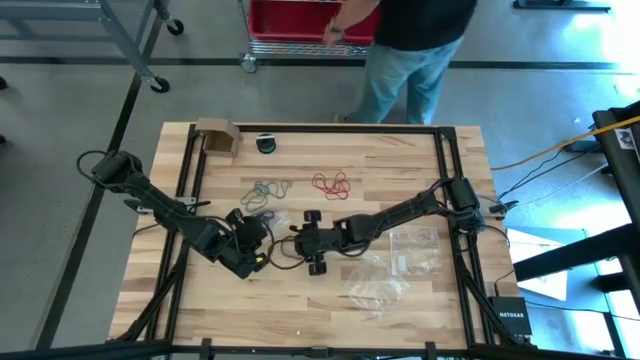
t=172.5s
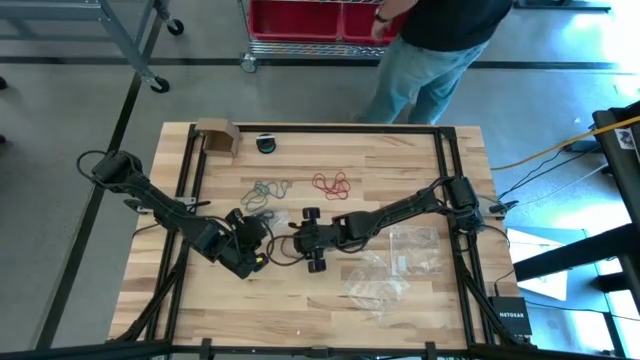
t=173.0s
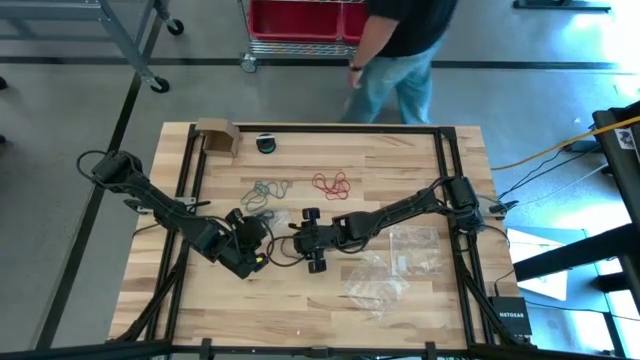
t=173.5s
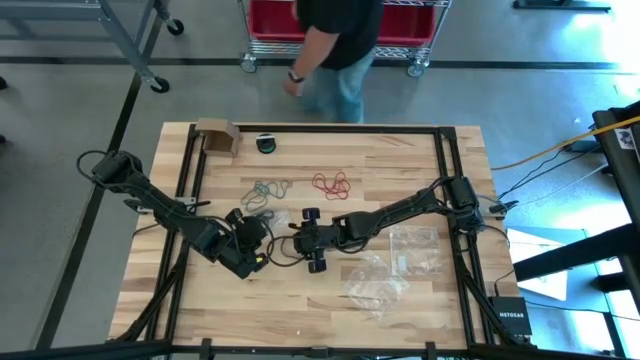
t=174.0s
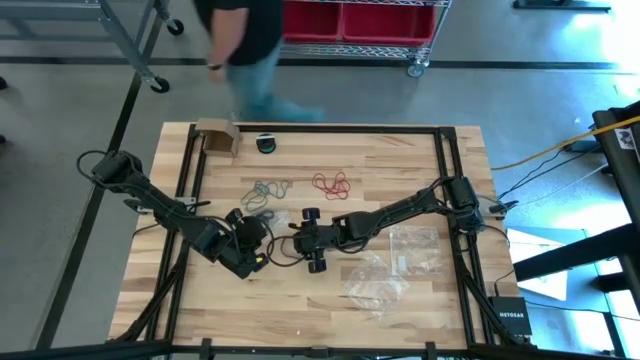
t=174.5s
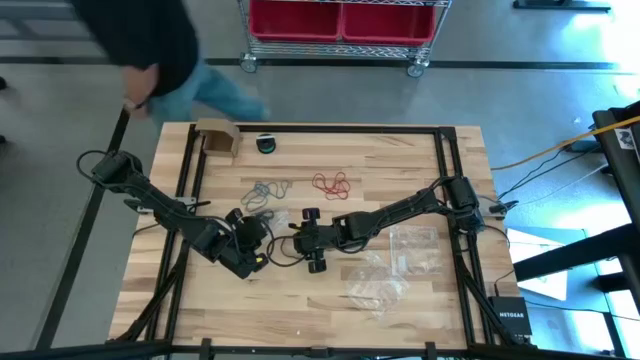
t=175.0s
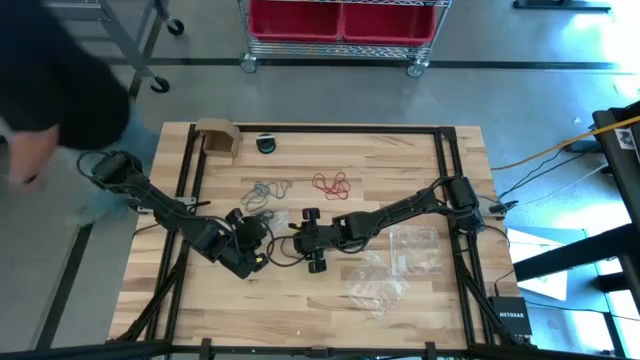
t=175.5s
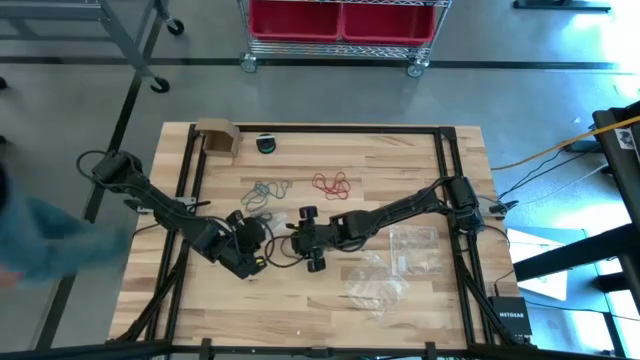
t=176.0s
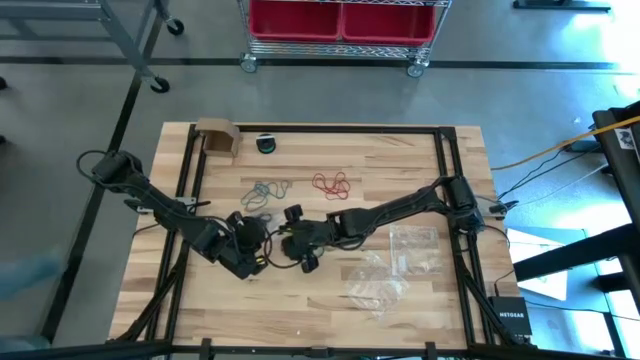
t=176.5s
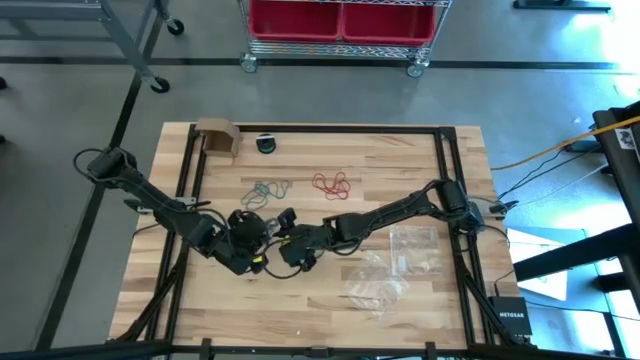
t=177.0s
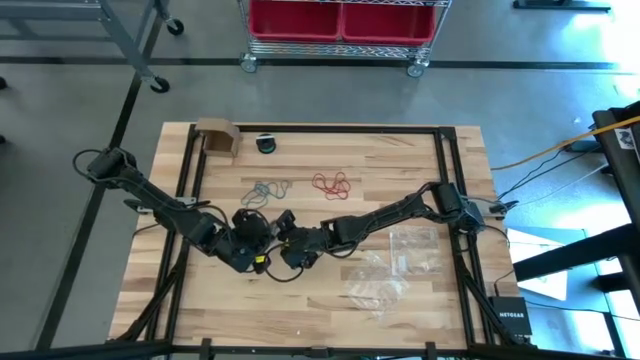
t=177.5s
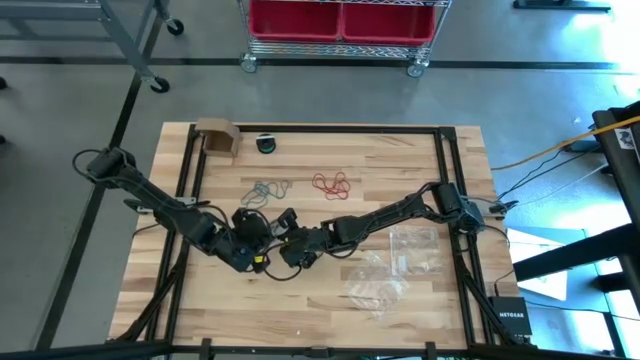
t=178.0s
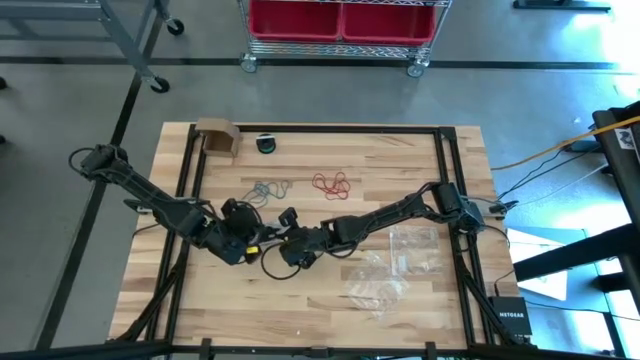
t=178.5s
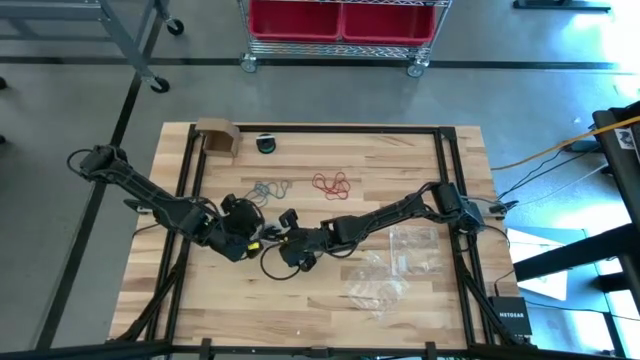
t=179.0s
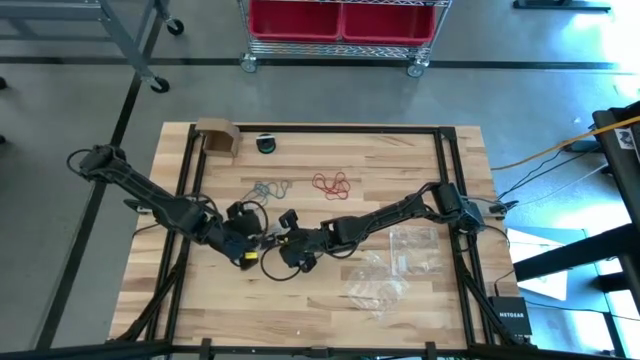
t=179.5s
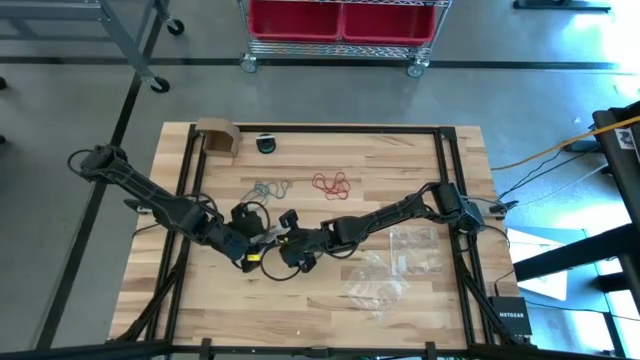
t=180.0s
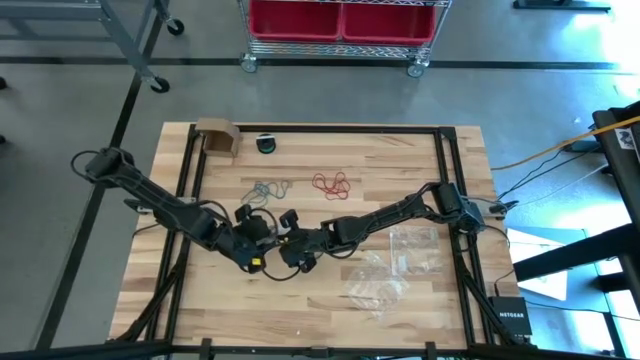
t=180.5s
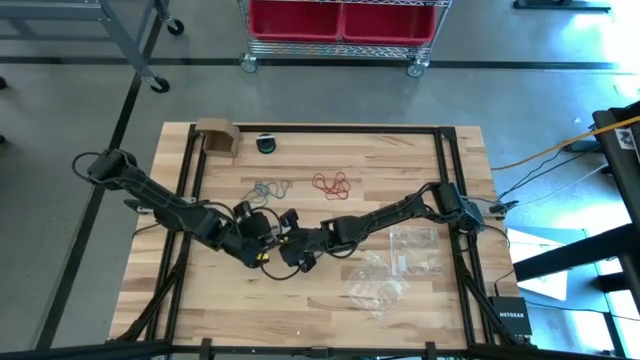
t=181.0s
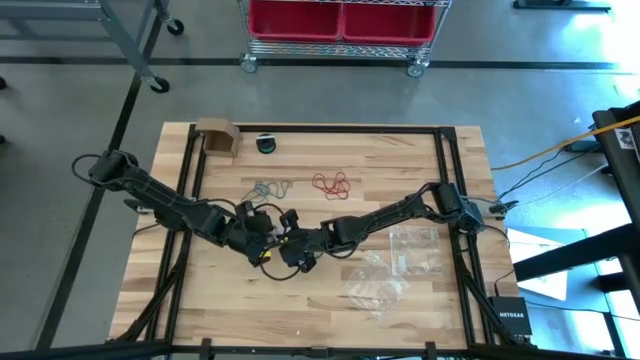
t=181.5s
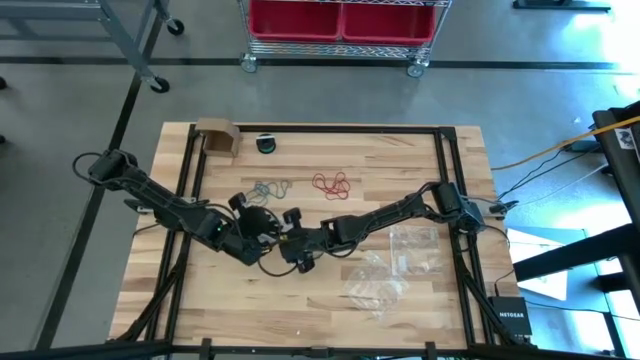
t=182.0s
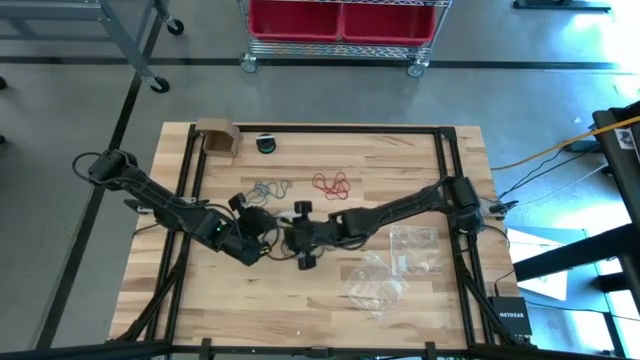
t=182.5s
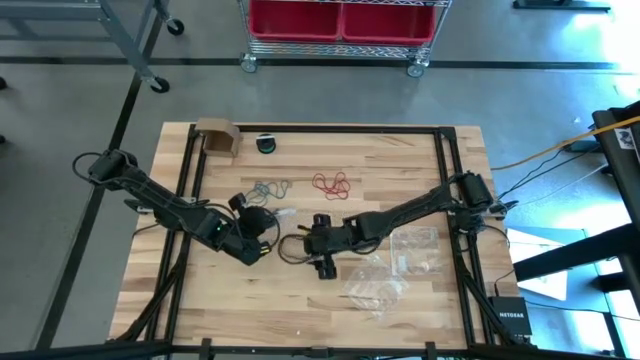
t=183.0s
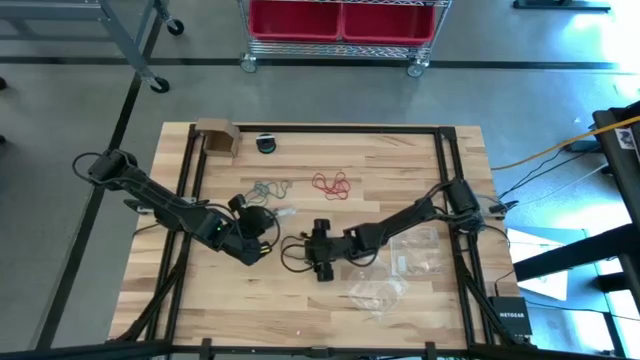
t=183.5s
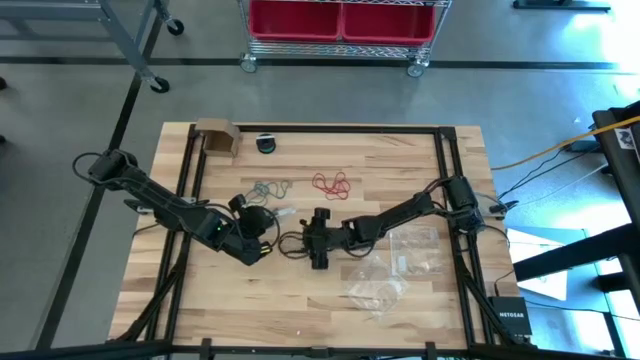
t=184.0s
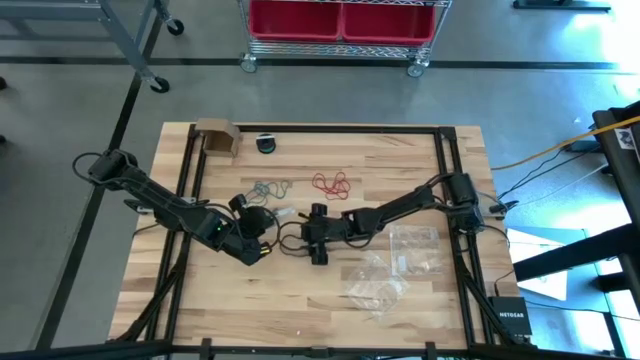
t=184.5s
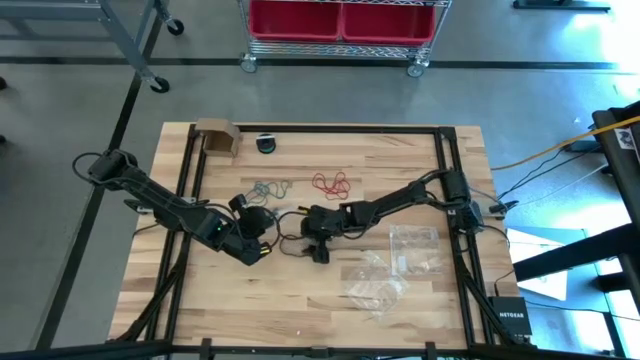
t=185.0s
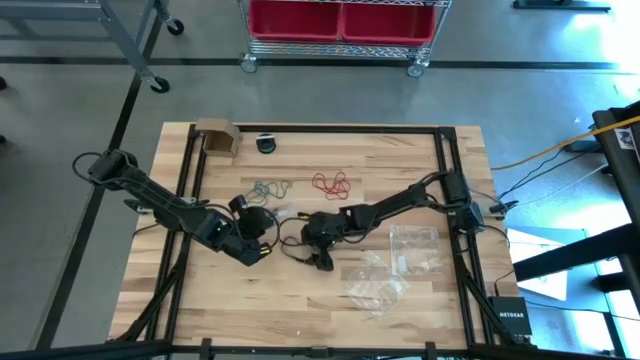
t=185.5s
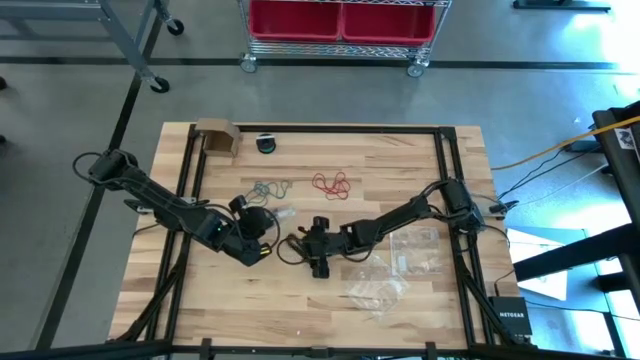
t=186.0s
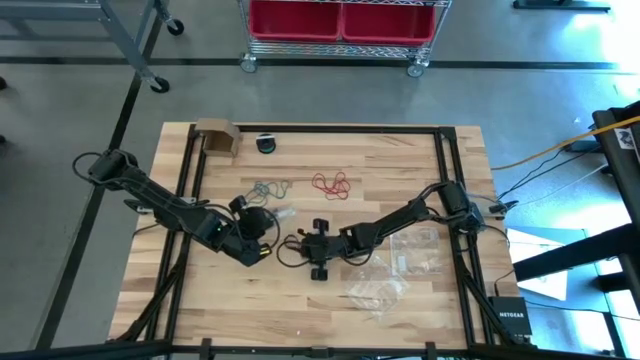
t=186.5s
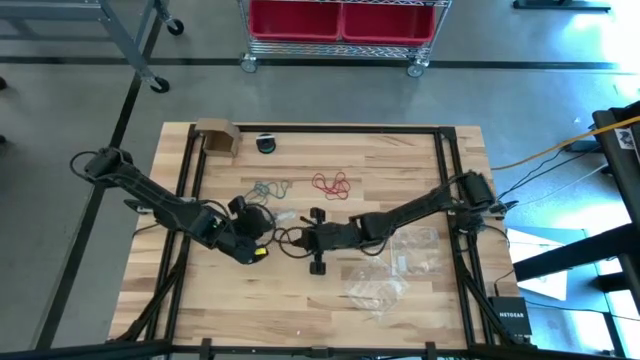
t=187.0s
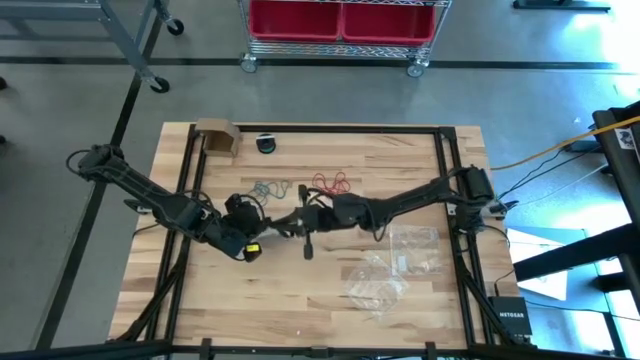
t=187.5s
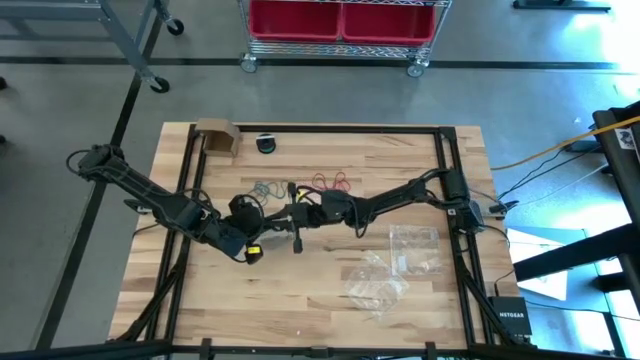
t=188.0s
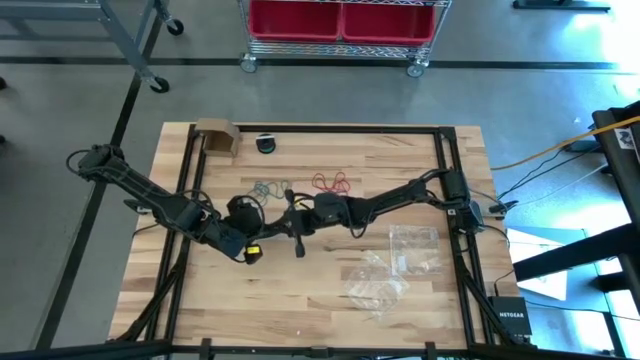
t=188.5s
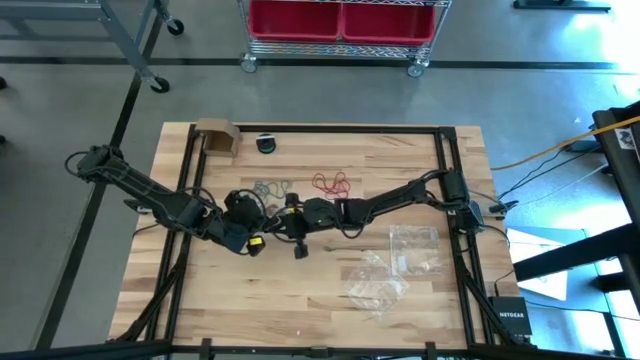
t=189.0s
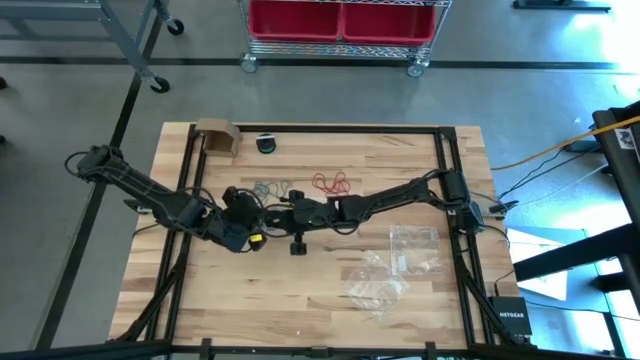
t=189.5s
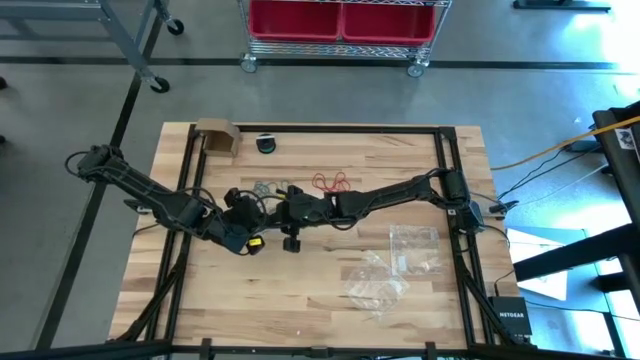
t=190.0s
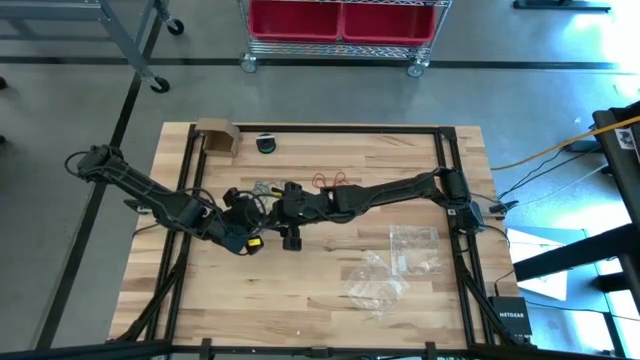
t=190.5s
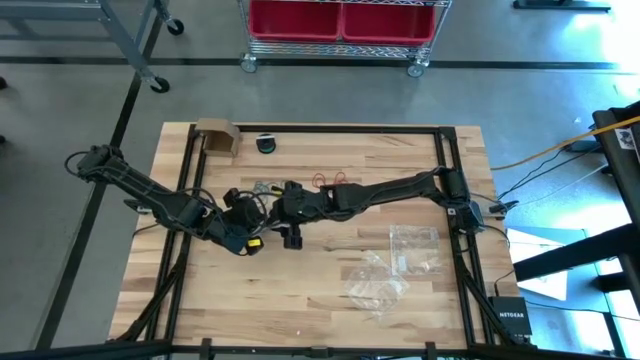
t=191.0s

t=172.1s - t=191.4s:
Task: Sort rubber bands
Put the black rubber band into the transparent zip bag

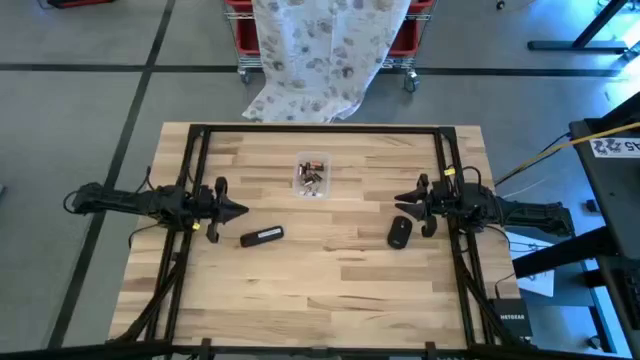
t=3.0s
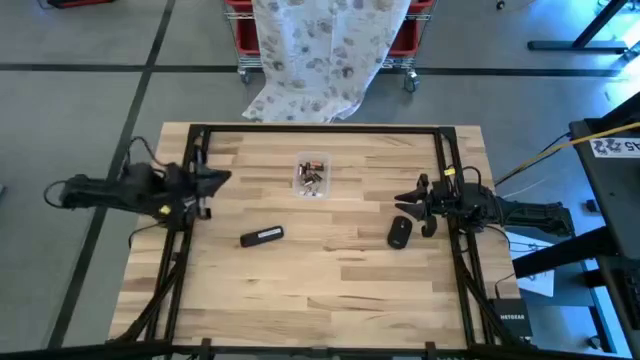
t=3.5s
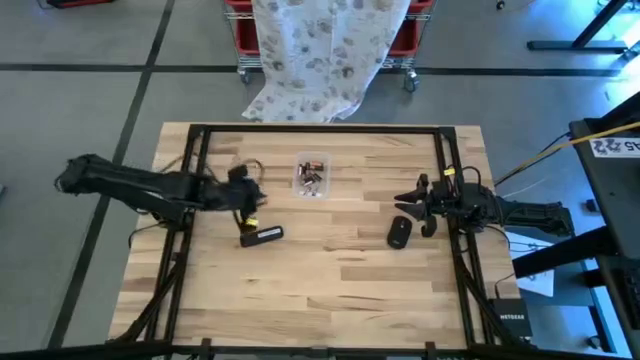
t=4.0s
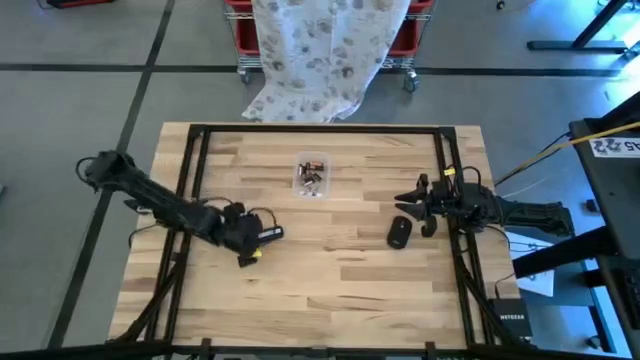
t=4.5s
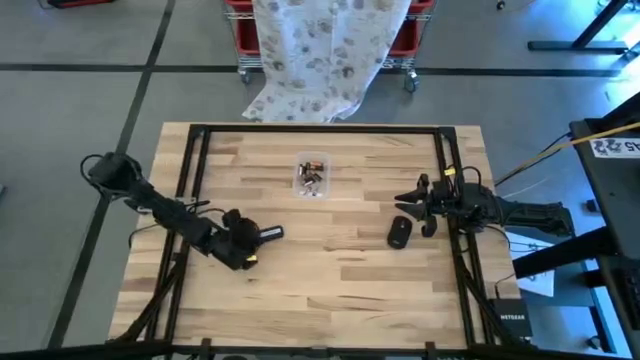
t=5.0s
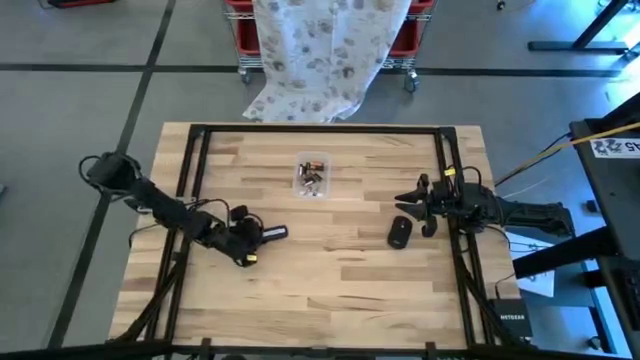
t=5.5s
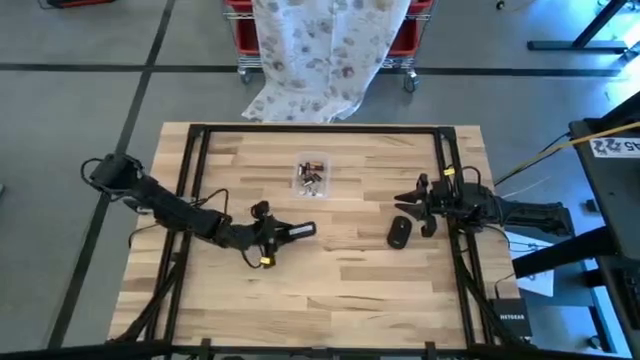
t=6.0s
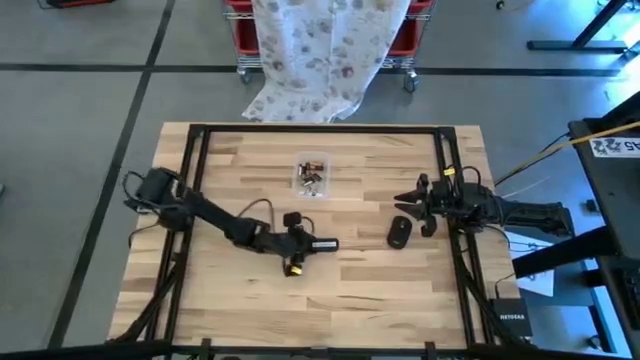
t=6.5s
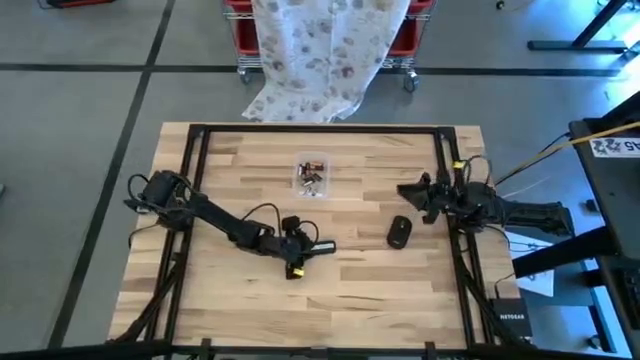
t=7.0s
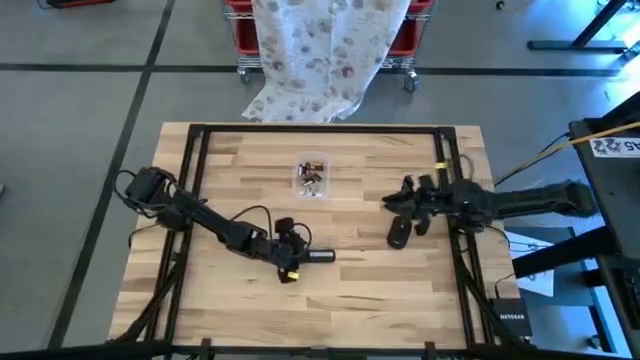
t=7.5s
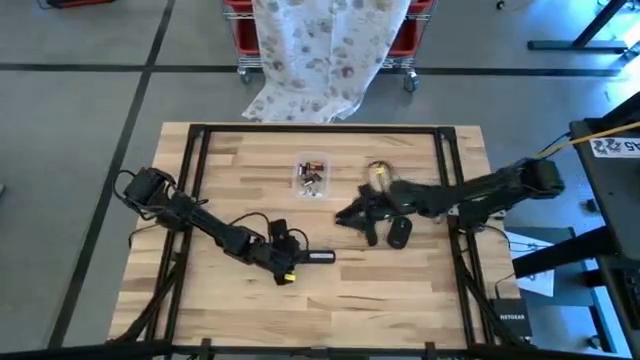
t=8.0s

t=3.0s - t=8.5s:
Task: Insert battery
Move the remote control to the center of the table
